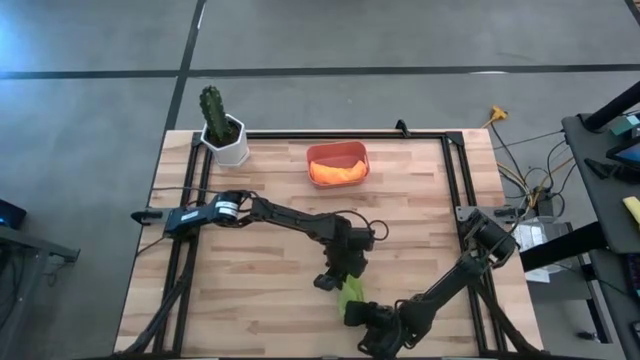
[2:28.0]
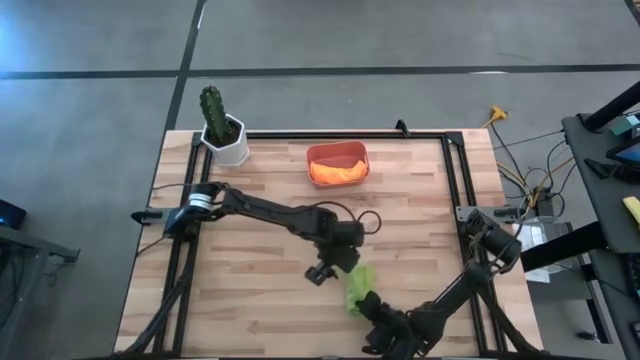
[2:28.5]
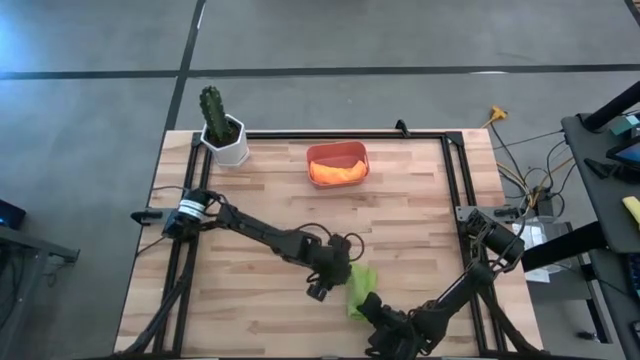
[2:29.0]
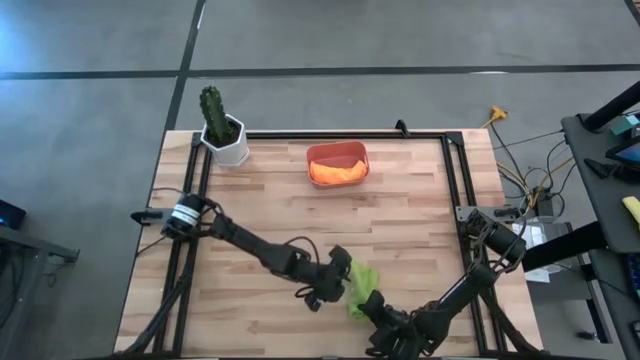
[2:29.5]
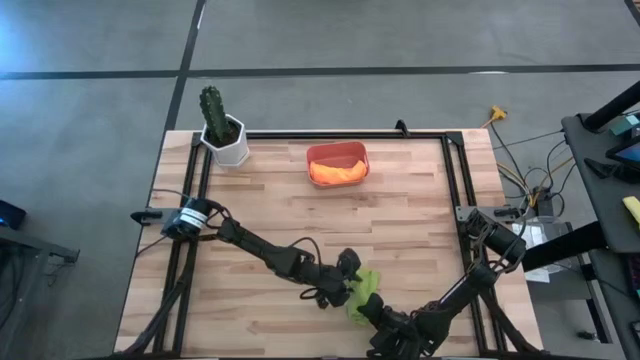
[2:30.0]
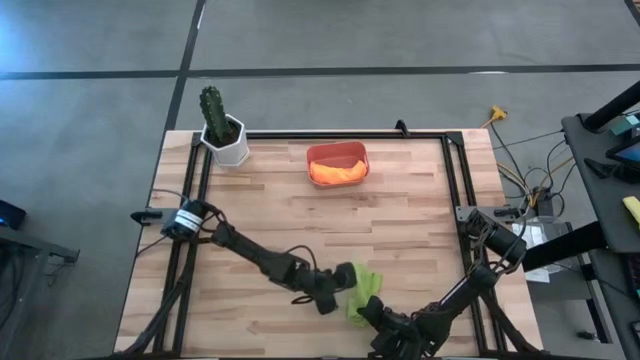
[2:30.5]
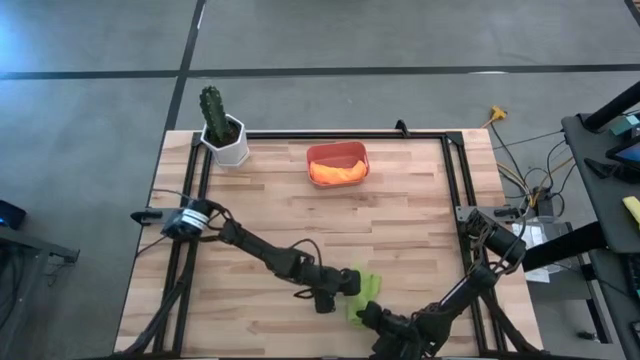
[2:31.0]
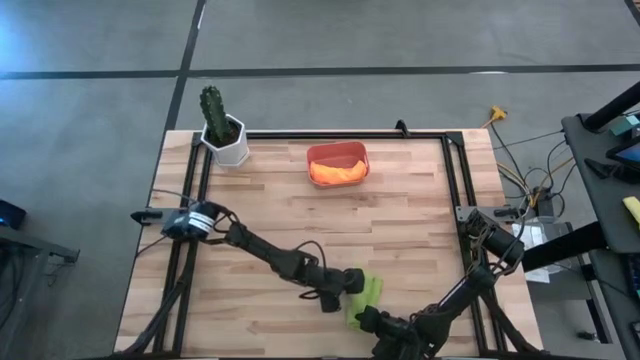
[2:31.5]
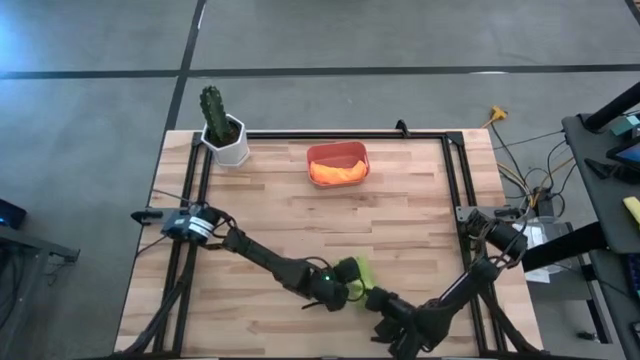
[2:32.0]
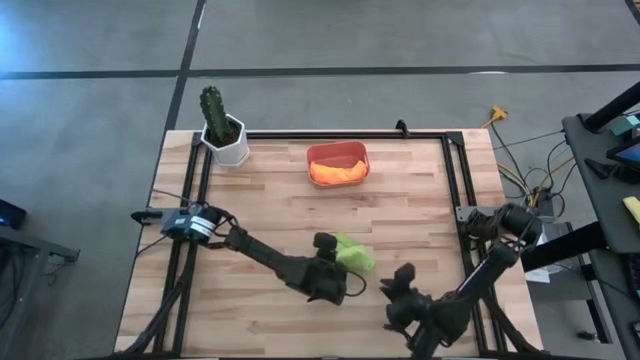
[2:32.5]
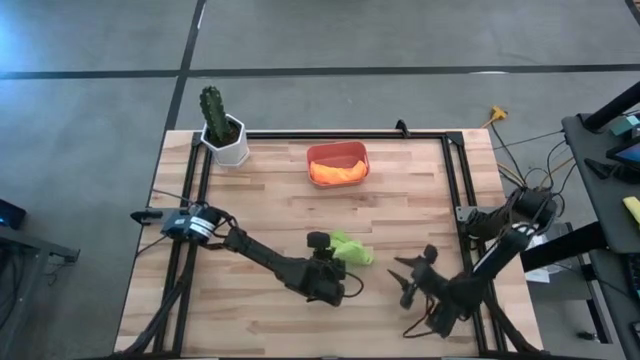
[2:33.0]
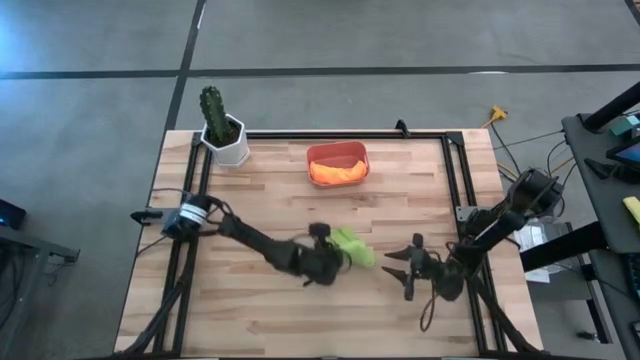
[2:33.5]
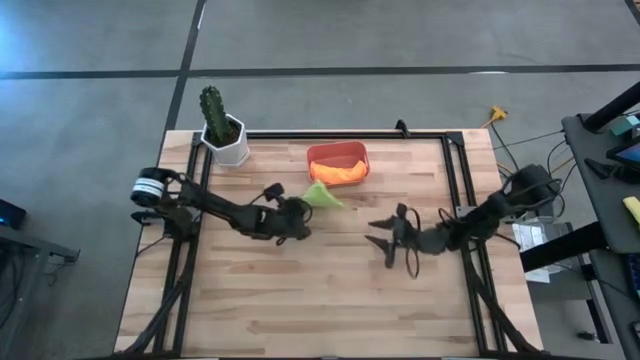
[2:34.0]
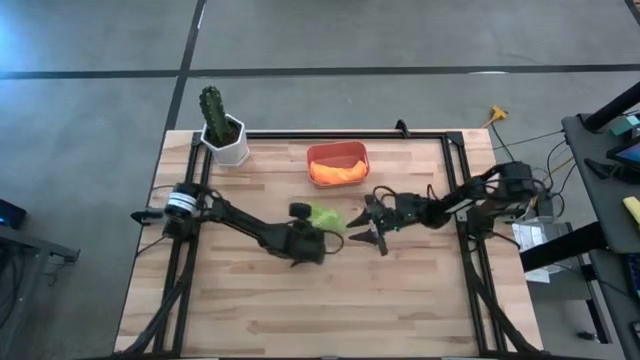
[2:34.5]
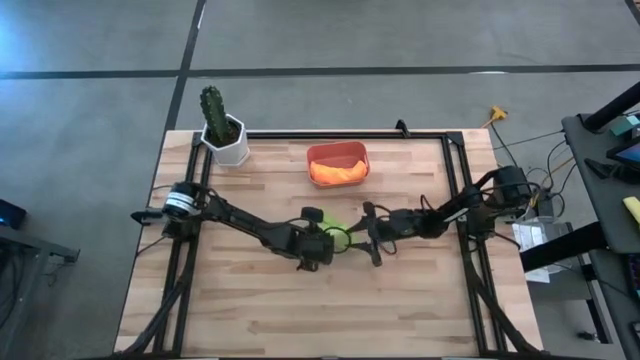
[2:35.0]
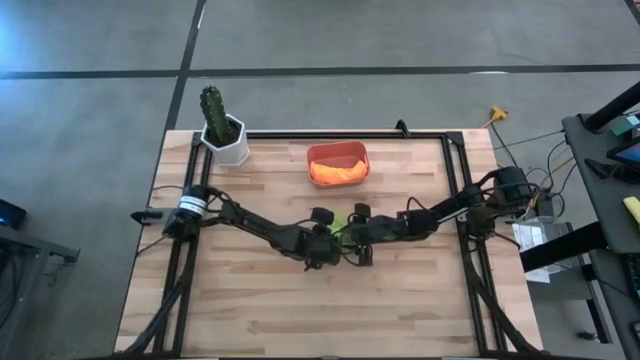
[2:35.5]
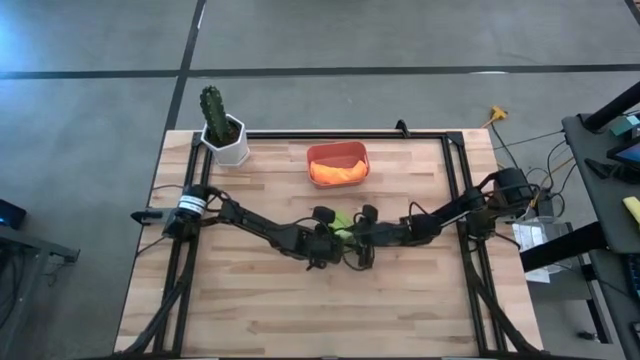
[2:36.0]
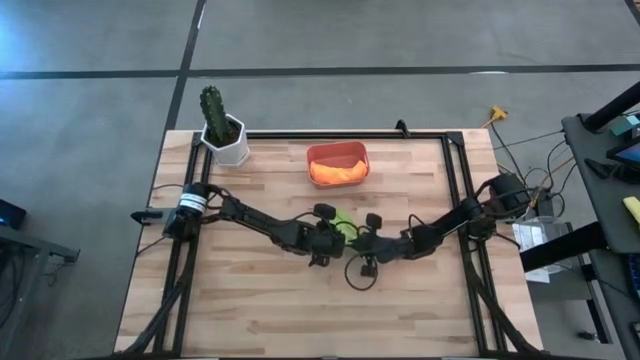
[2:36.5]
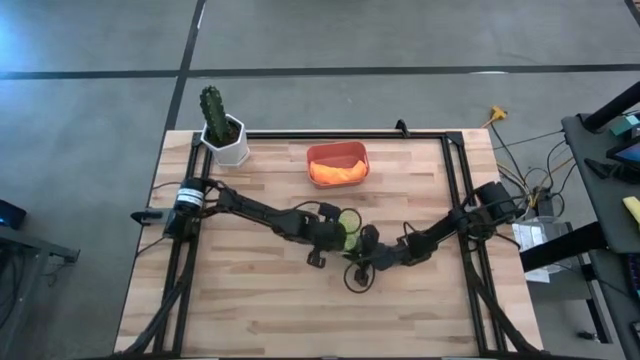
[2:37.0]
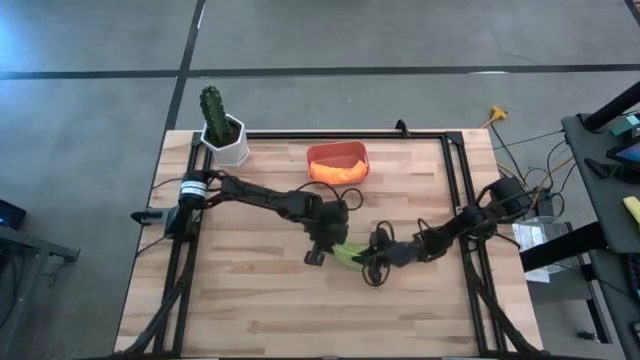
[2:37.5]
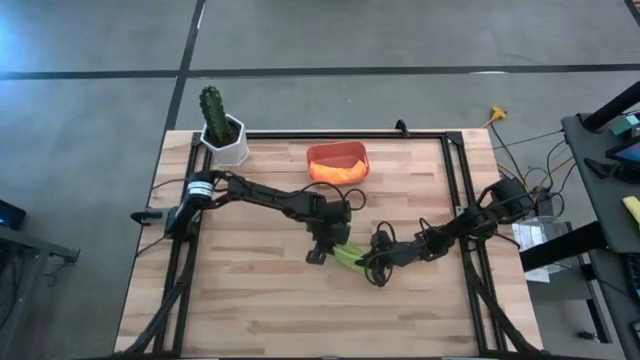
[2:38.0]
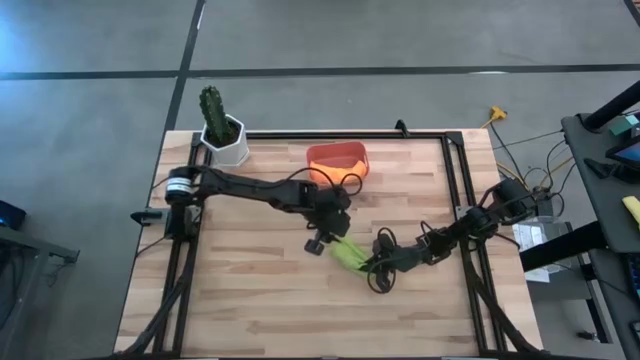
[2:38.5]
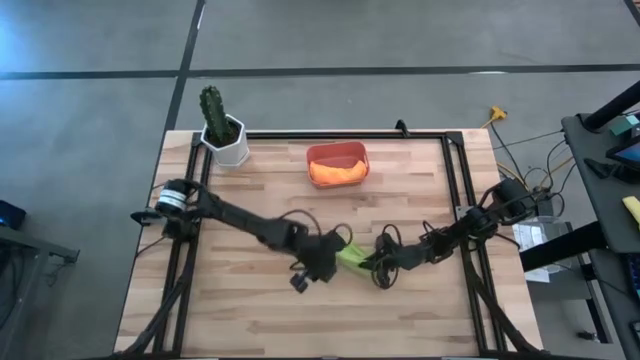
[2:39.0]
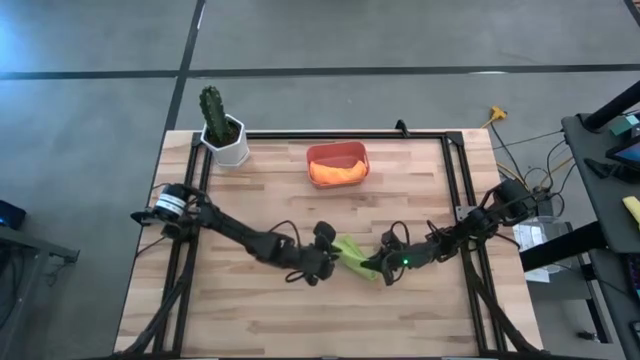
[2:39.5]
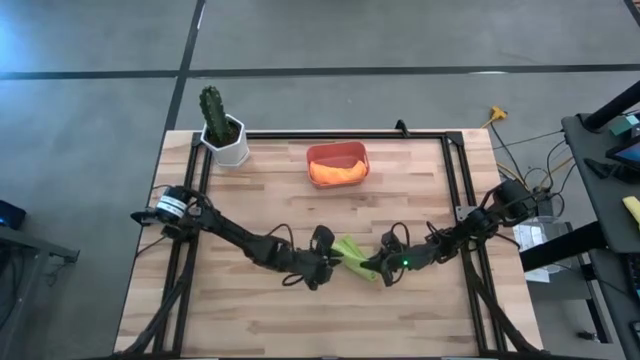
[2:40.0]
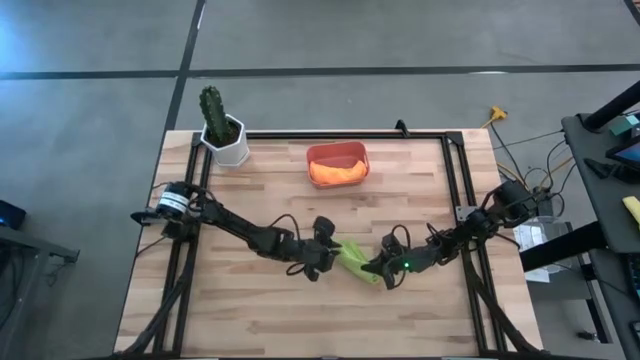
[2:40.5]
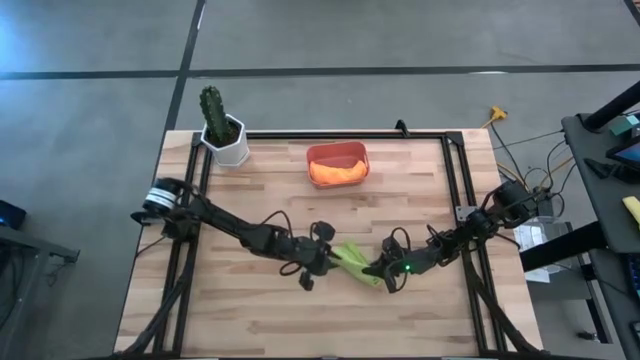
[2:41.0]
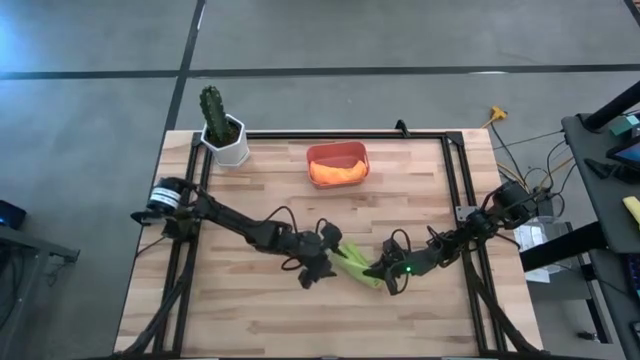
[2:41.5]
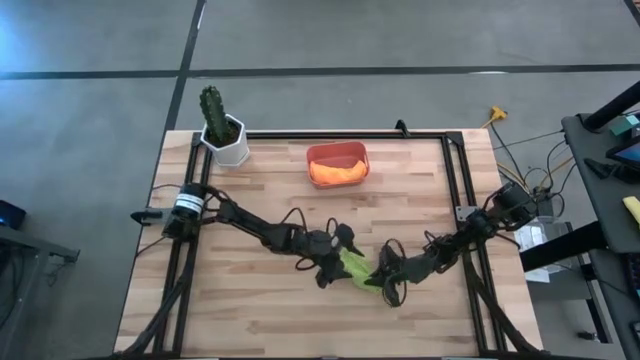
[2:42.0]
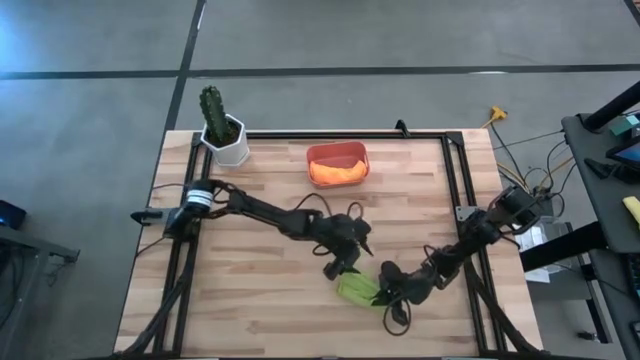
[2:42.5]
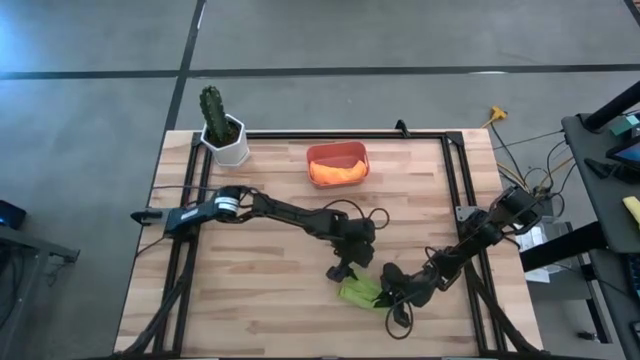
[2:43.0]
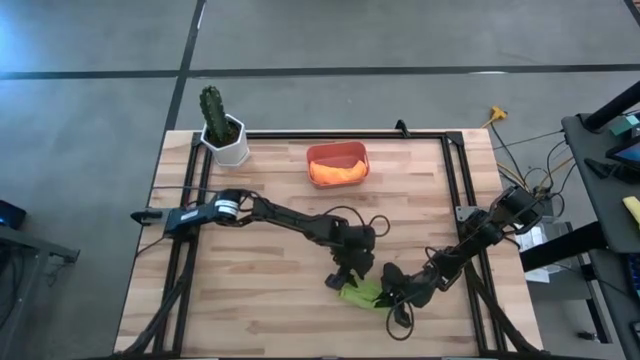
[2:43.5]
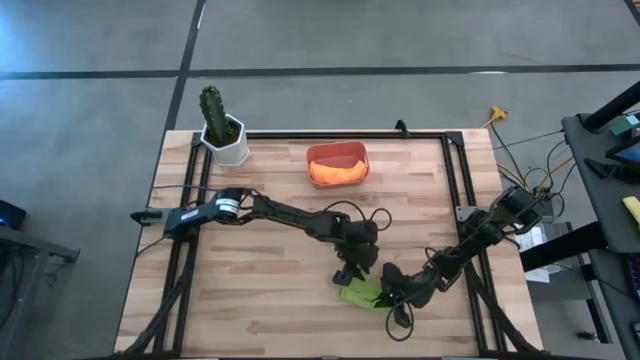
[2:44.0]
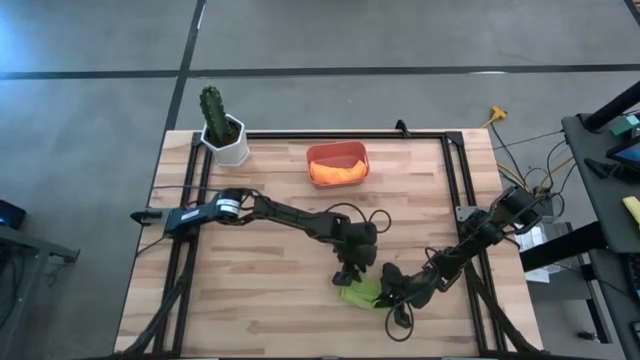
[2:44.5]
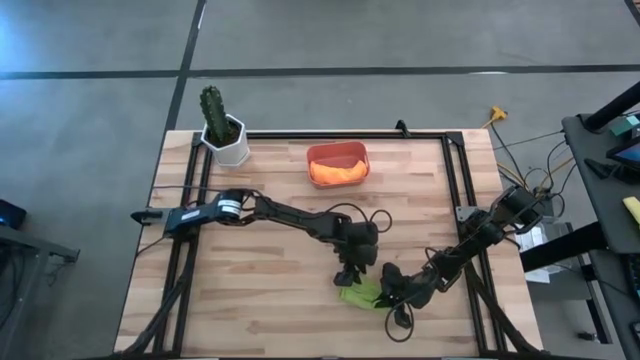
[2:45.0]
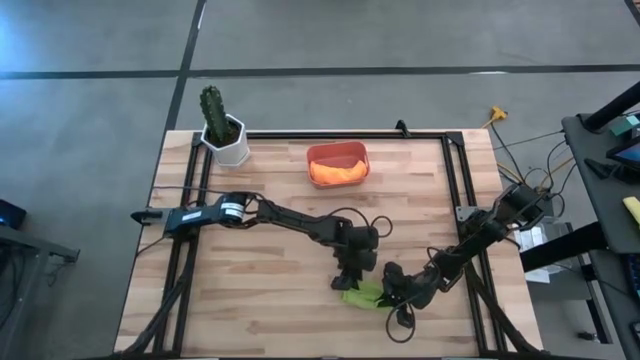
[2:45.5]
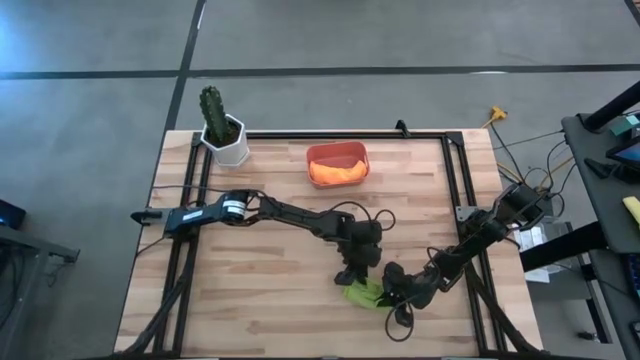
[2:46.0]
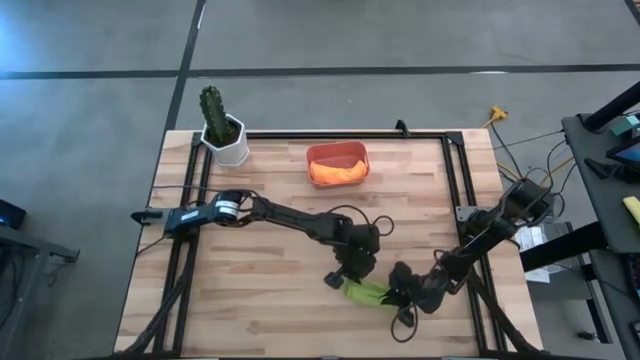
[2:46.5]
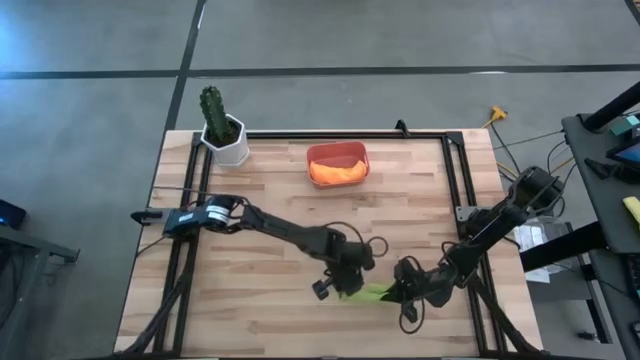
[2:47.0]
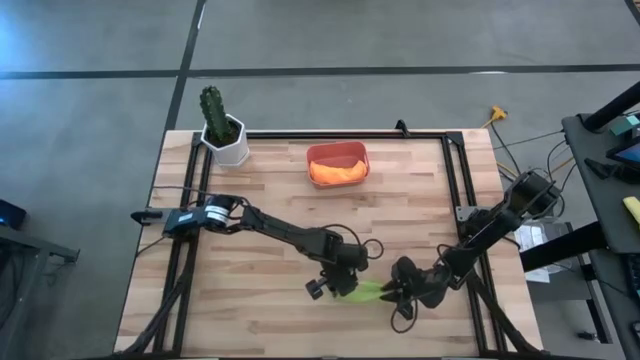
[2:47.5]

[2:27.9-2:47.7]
Task: Roll microfiber towels into tight, uniform cylinder then place into a basket
Roll the green microfiber cloth

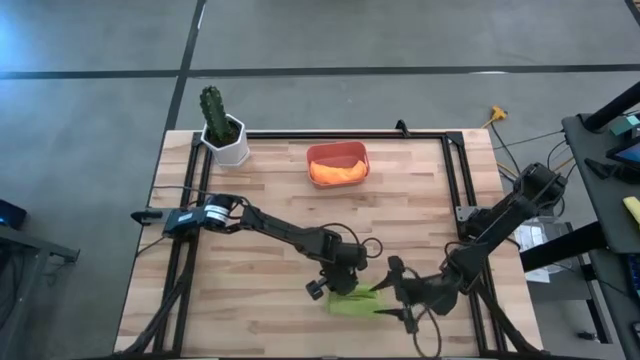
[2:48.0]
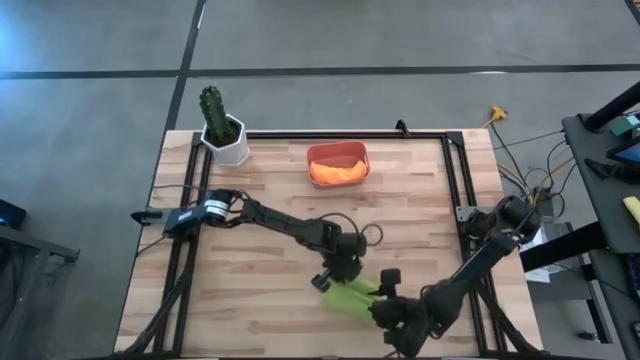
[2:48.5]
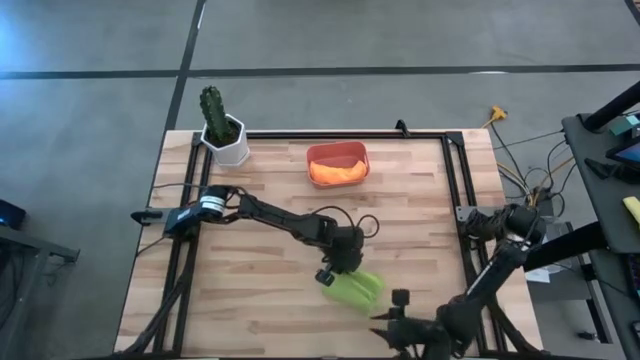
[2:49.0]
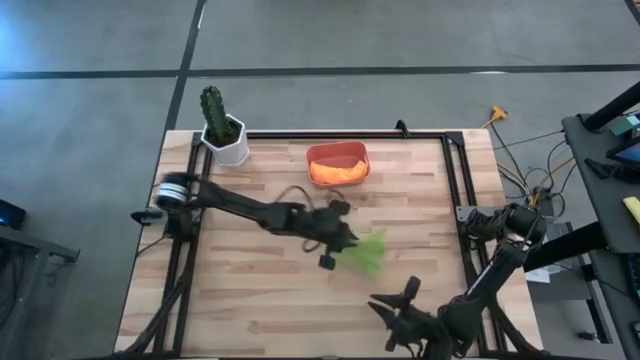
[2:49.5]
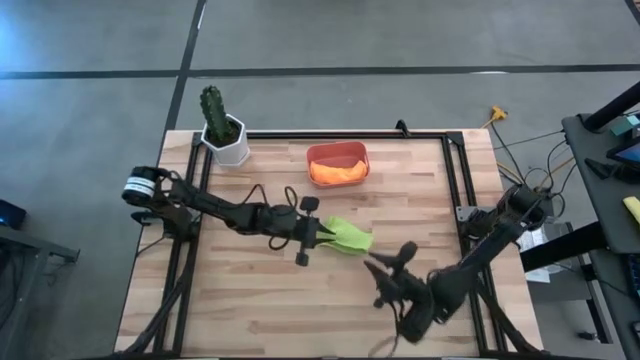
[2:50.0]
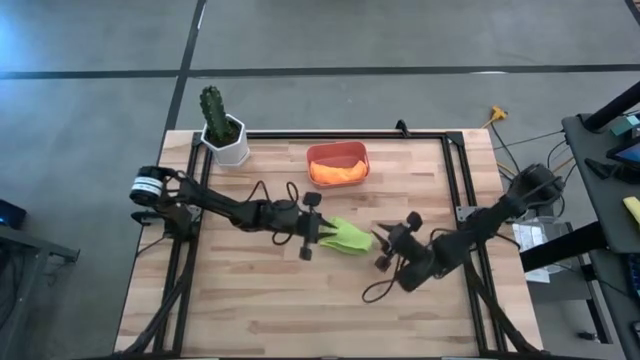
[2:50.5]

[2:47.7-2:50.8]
Roll the green microfiber cloth
